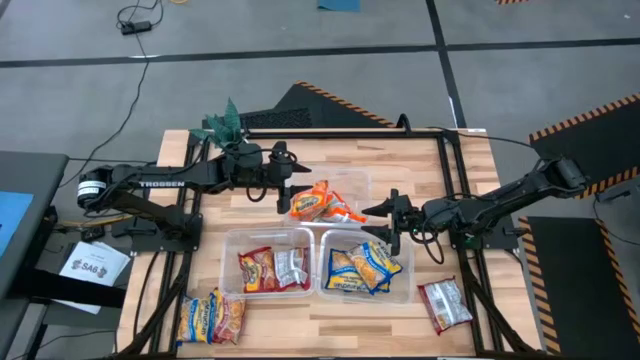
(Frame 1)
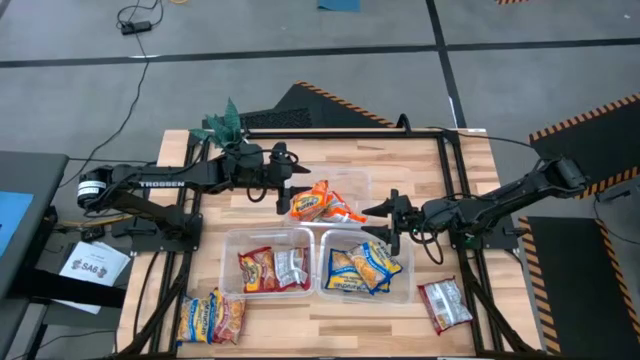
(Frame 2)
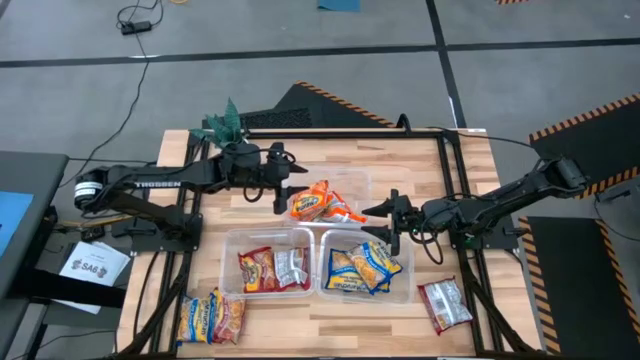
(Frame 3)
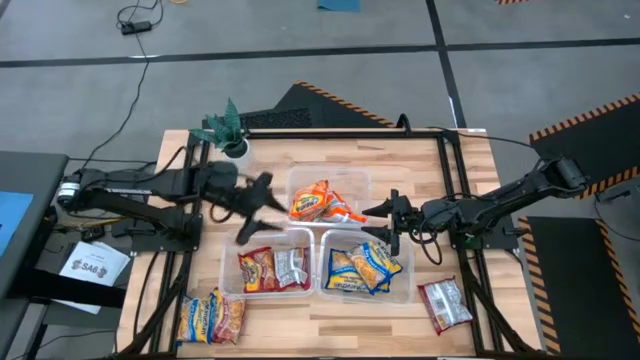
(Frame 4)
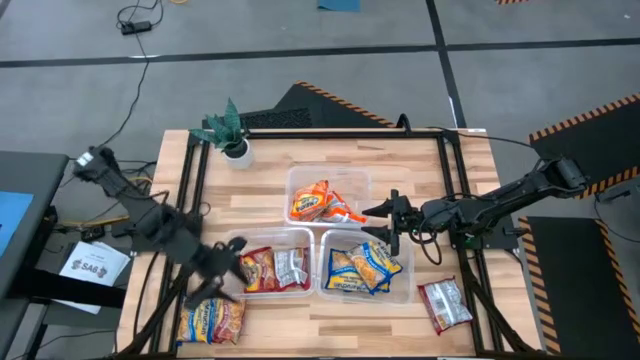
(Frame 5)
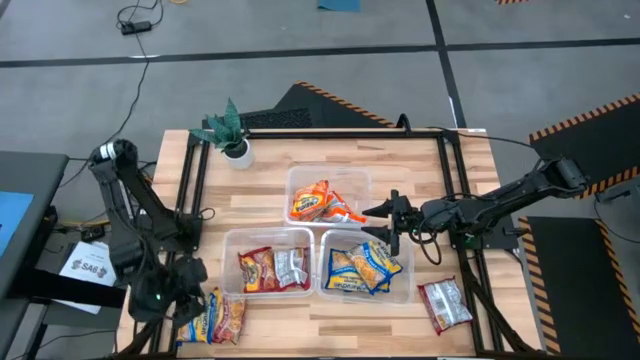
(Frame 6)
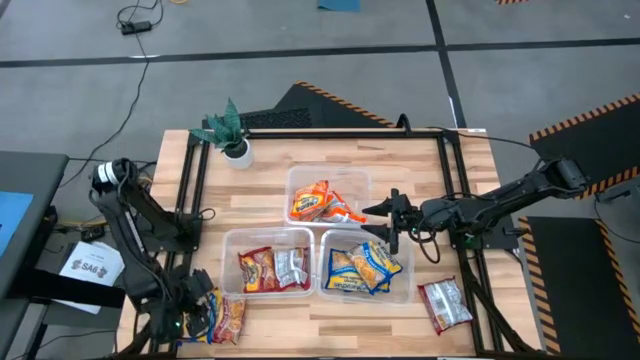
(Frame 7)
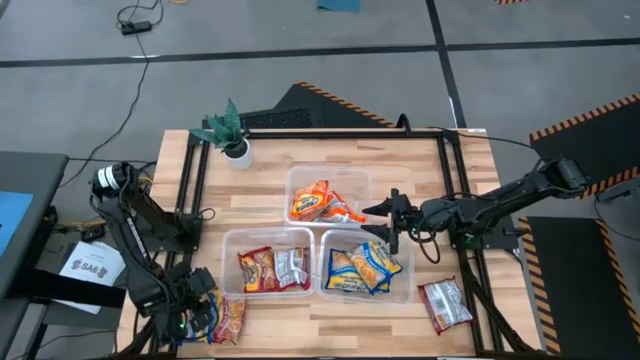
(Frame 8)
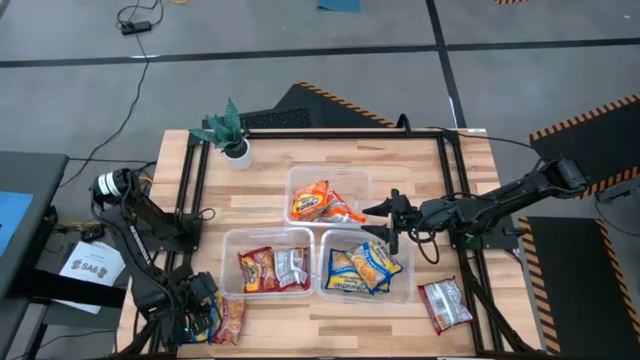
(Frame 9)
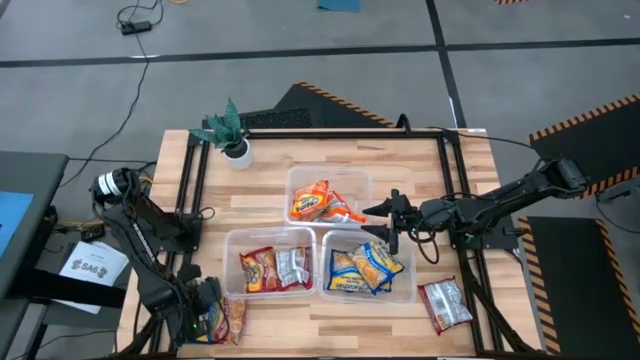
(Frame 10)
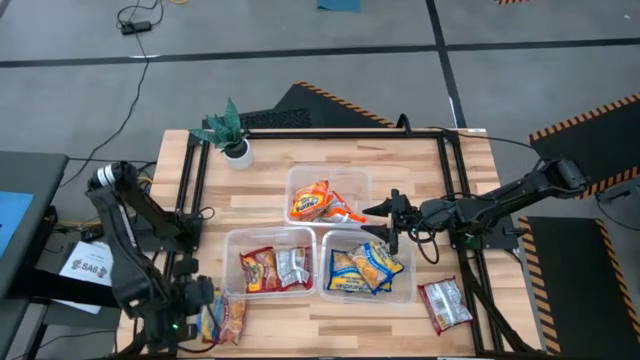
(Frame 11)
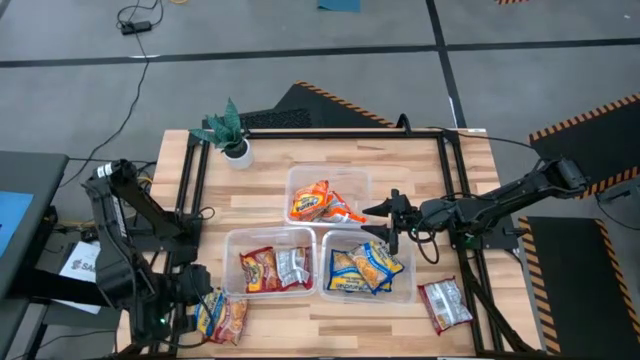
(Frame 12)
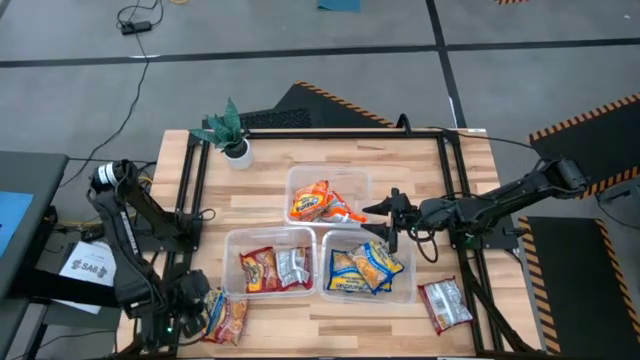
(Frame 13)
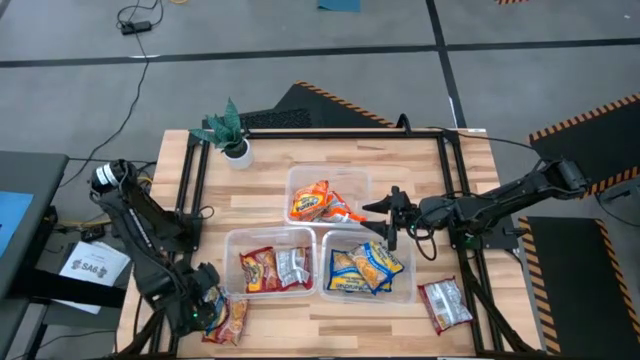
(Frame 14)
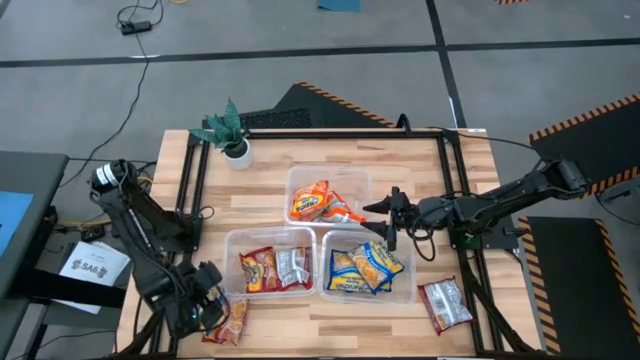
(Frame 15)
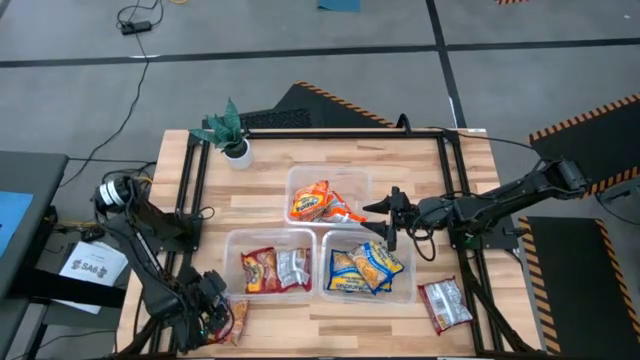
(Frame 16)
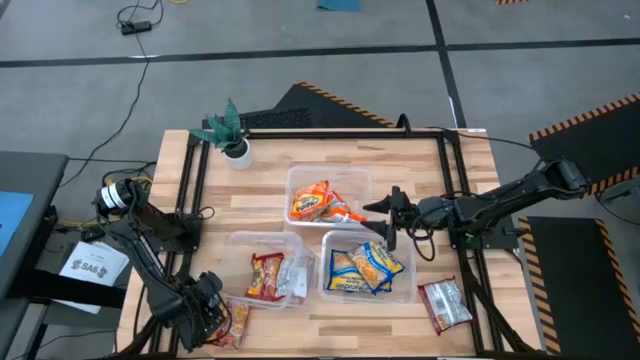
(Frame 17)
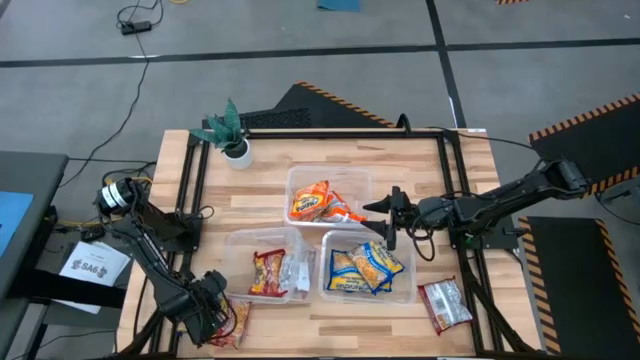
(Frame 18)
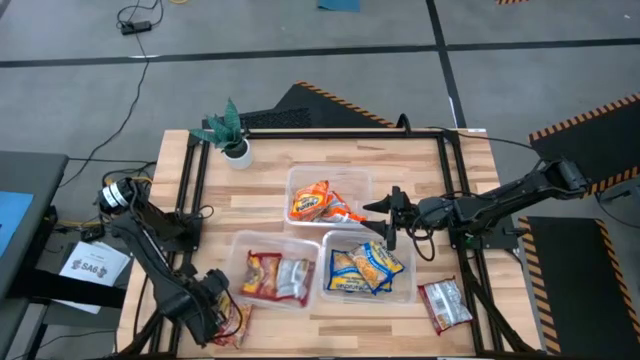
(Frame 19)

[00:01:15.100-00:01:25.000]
Task: Sort Maruchan noodles
Put the blue noodle pack into the bottom right transparent bin

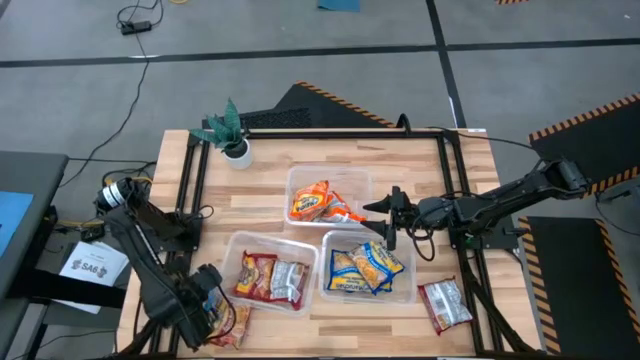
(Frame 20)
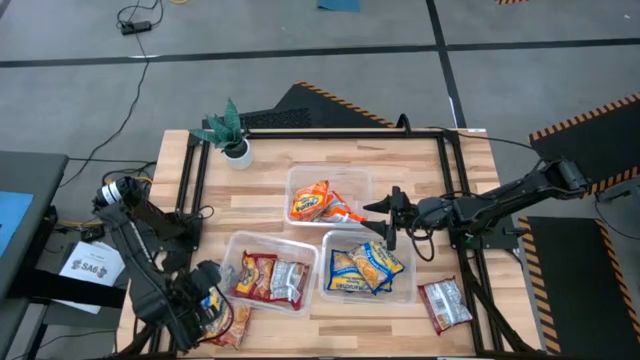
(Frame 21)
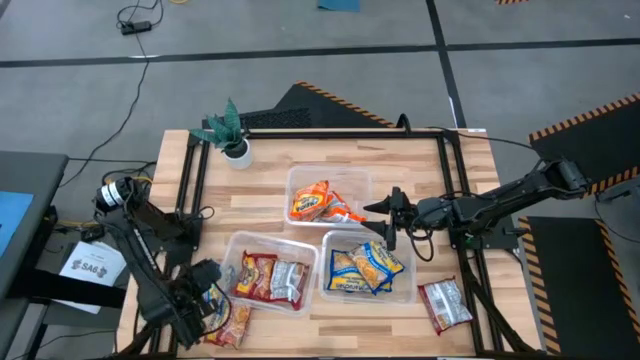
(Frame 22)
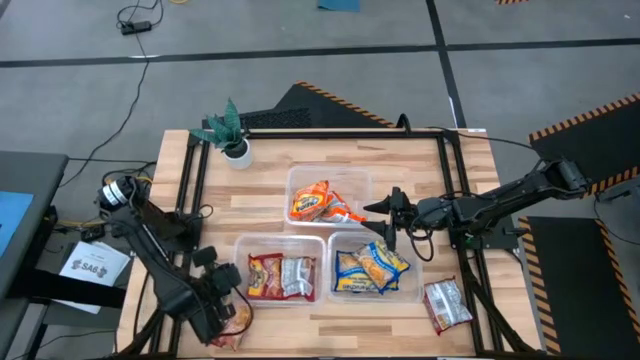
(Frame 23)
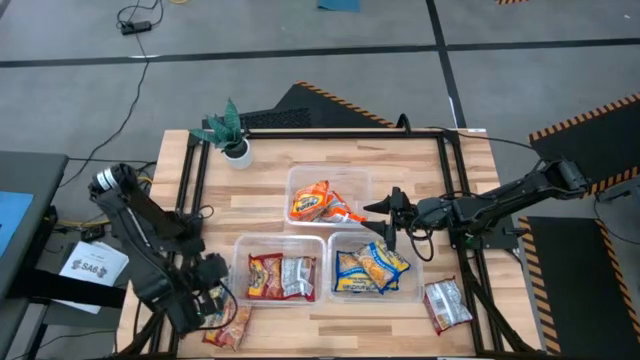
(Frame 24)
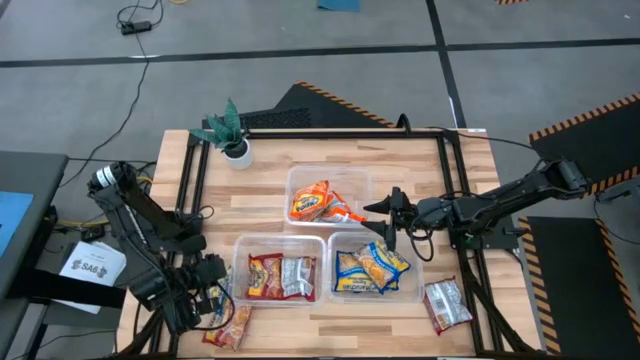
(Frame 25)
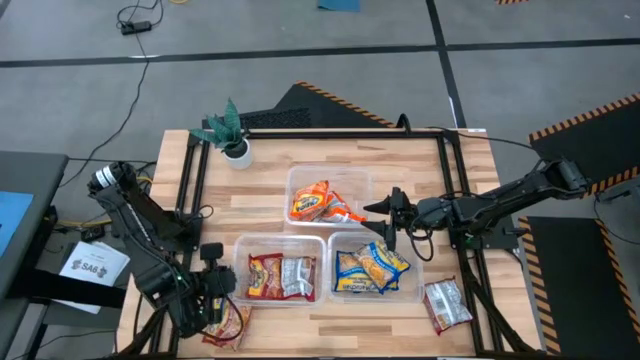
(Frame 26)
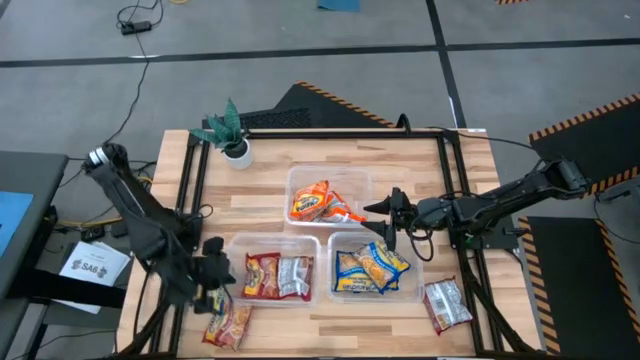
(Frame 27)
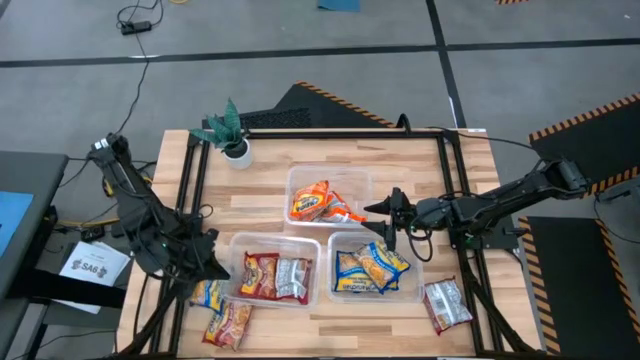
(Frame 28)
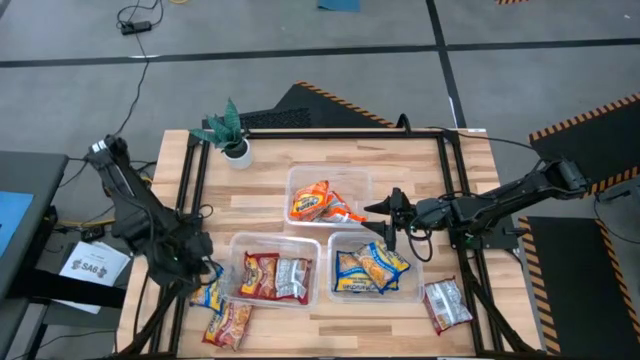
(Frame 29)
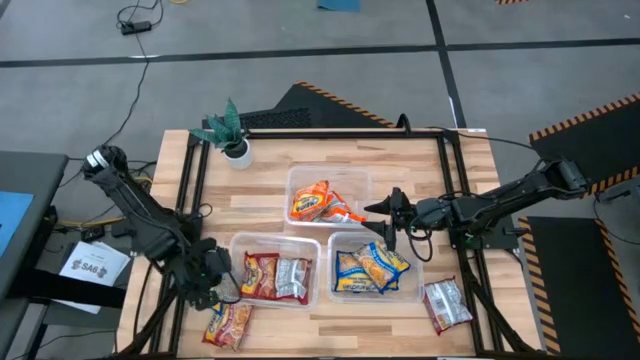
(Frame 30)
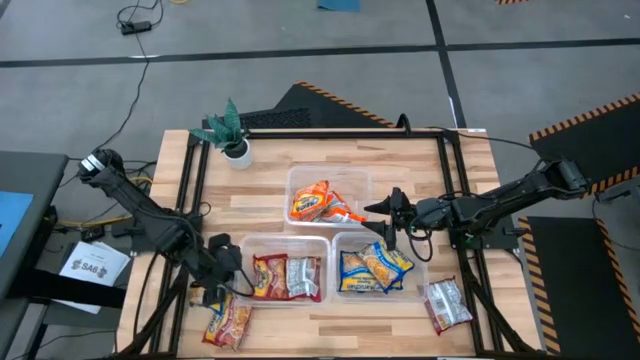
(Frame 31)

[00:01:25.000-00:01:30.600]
Adjust the bottom left transparent bin on the table

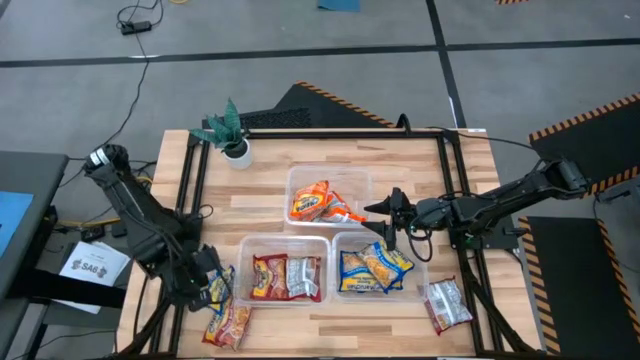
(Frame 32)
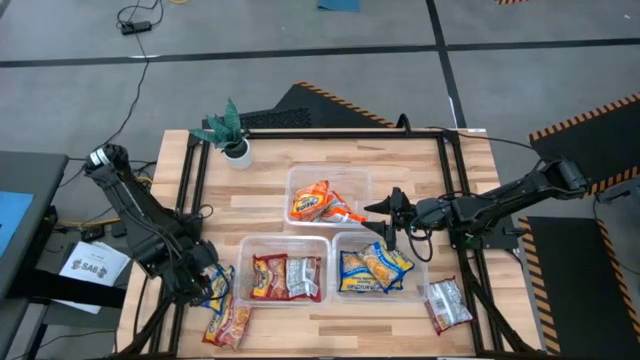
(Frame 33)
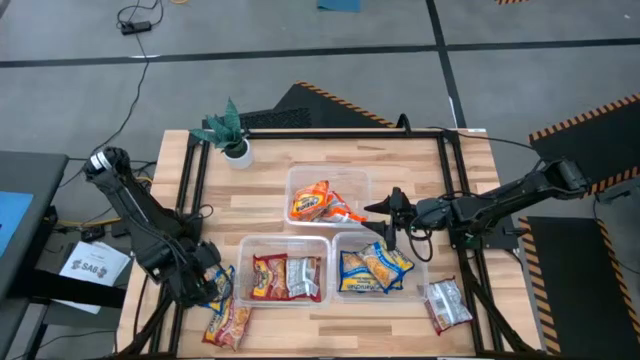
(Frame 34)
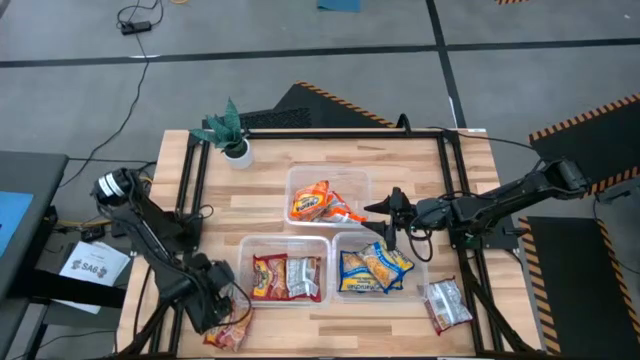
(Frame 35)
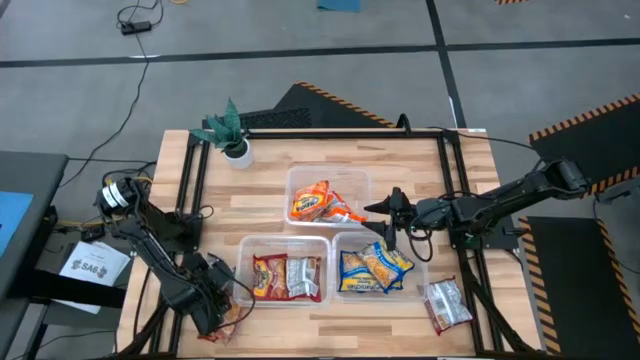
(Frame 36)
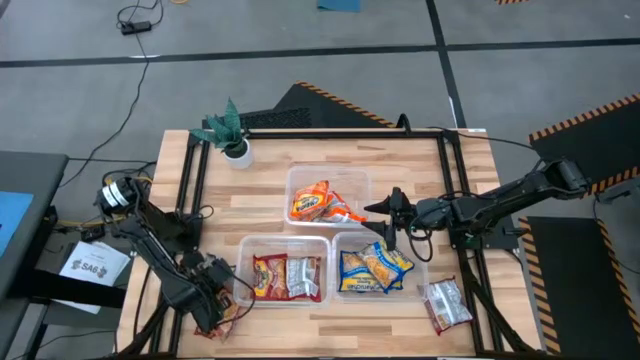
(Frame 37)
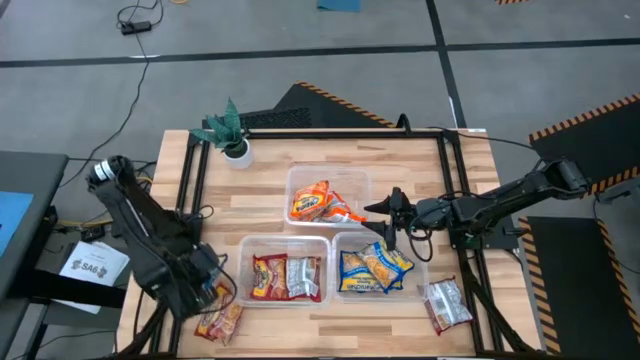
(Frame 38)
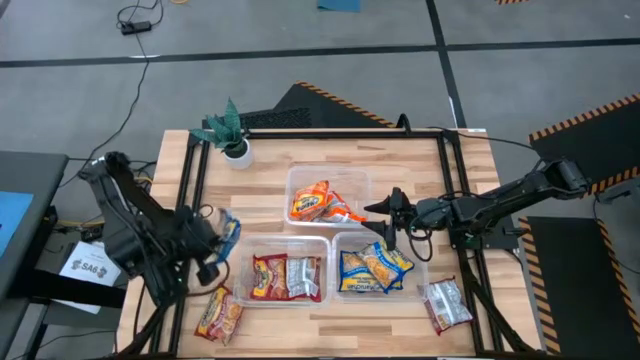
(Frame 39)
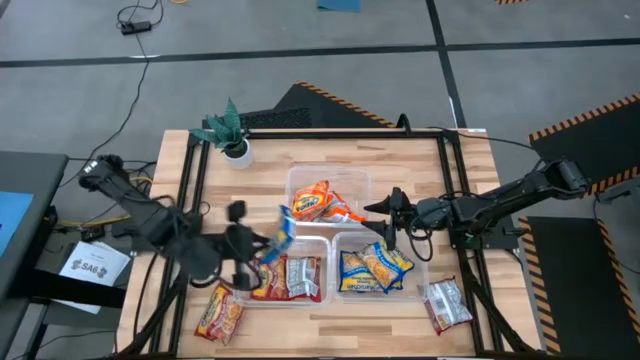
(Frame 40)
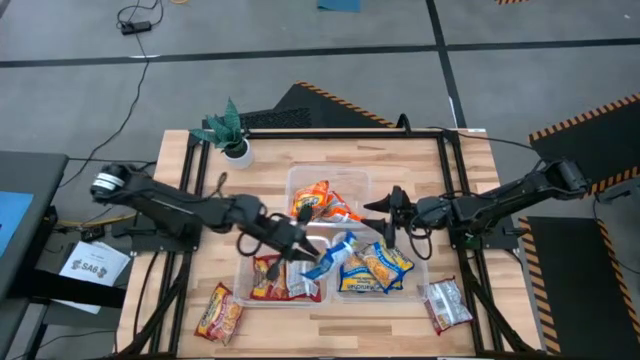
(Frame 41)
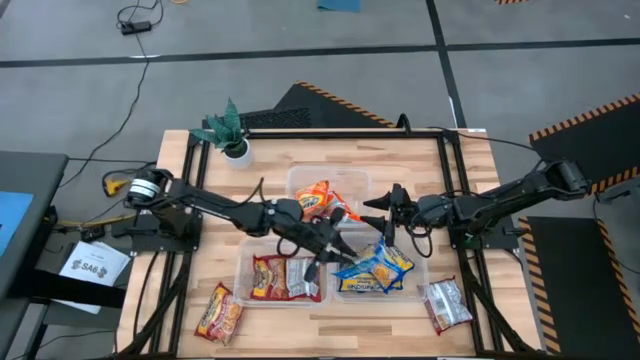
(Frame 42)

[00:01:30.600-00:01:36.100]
Put the blue noodle pack into the bottom right transparent bin

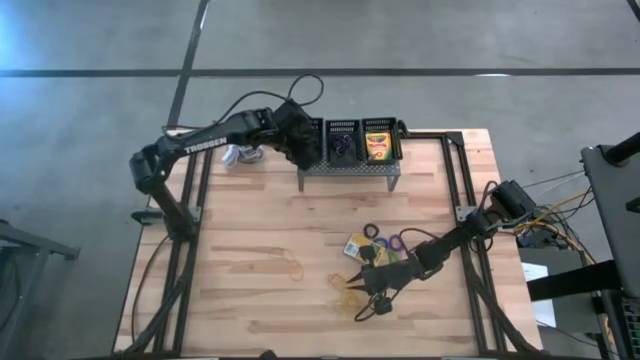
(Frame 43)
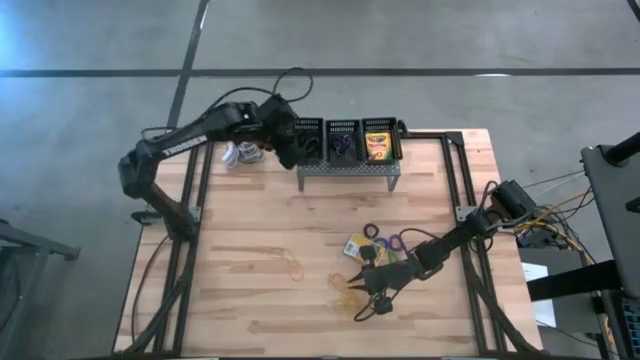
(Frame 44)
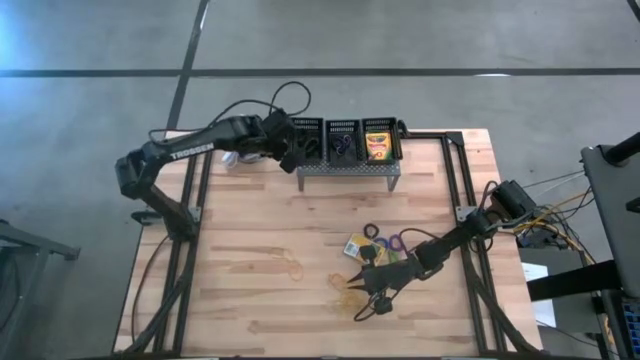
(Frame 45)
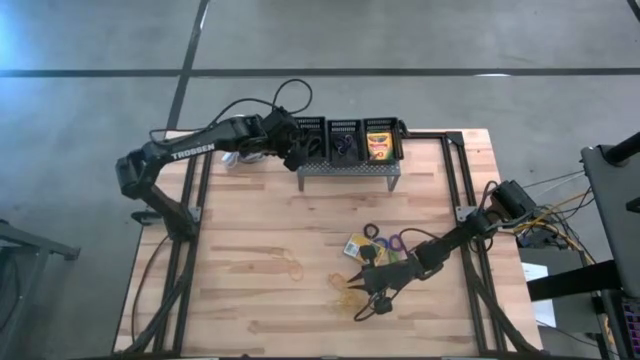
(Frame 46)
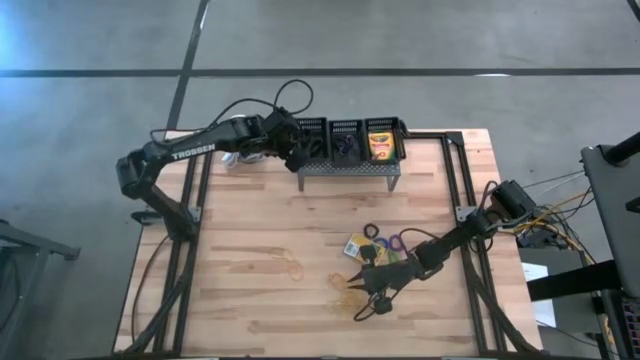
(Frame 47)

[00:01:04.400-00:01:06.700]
Task: Pick & Place Office Desk Supplies
Adjust the left black bin on the shelf
